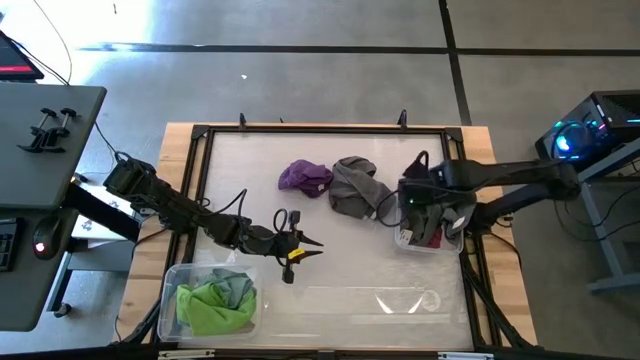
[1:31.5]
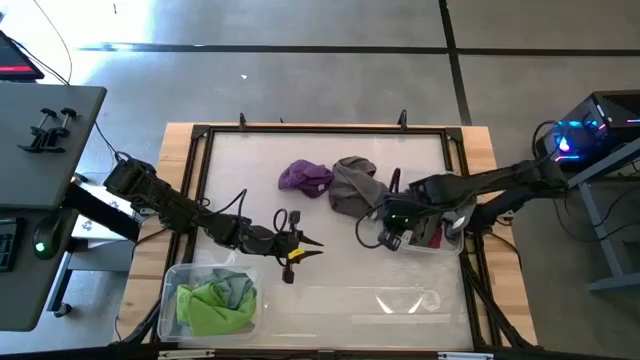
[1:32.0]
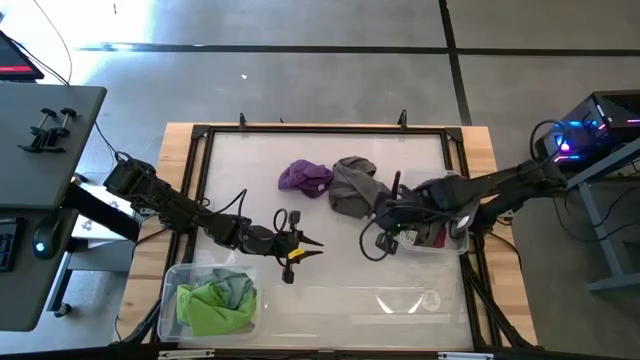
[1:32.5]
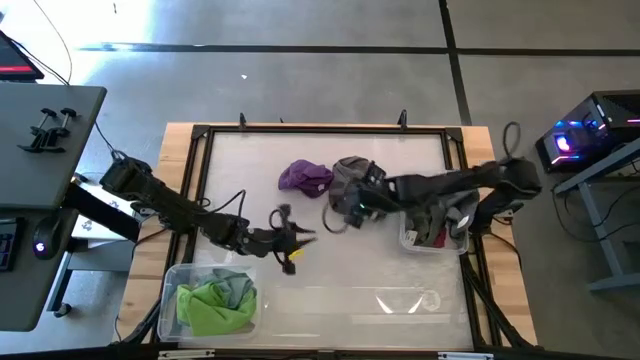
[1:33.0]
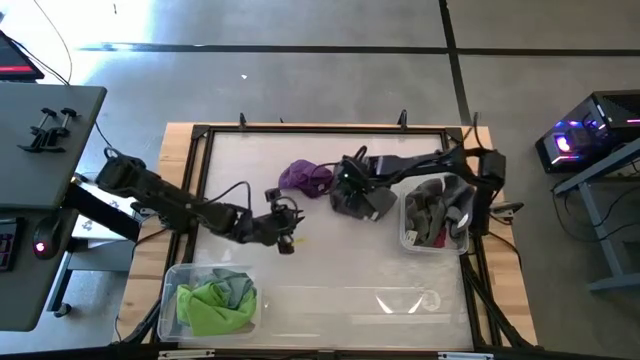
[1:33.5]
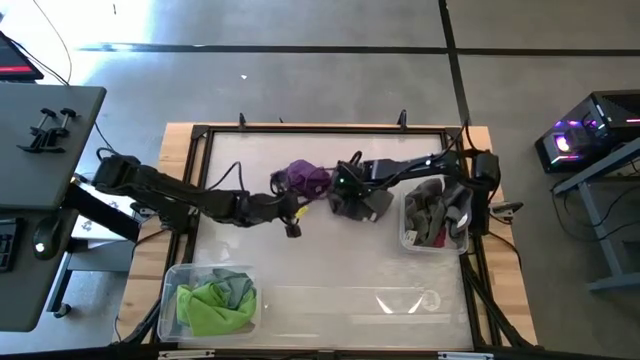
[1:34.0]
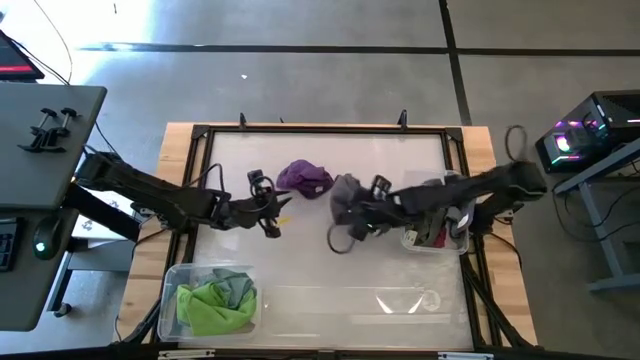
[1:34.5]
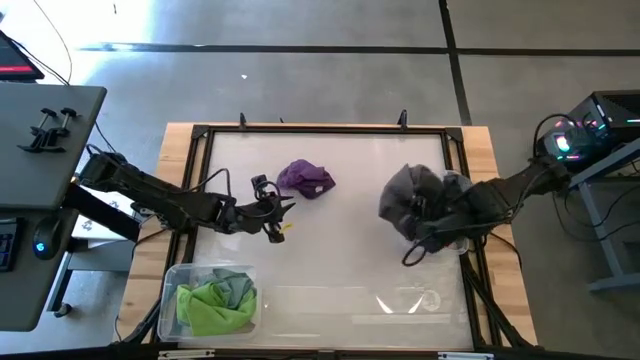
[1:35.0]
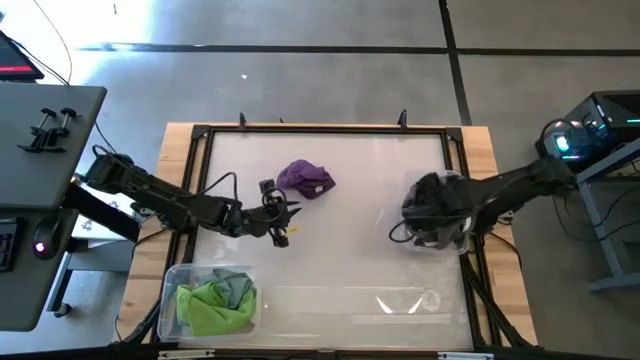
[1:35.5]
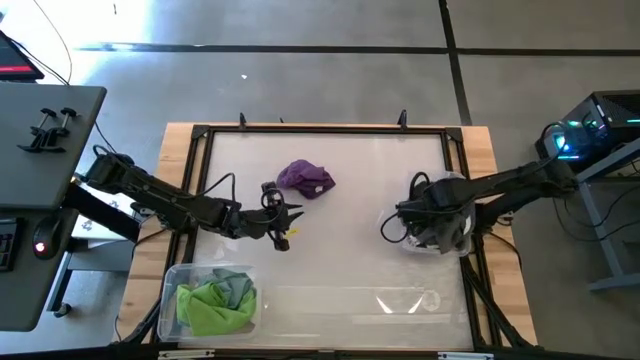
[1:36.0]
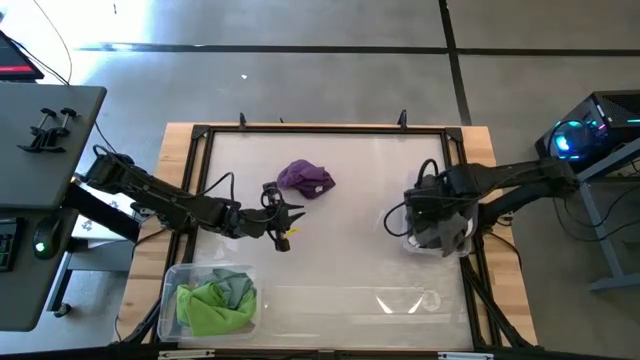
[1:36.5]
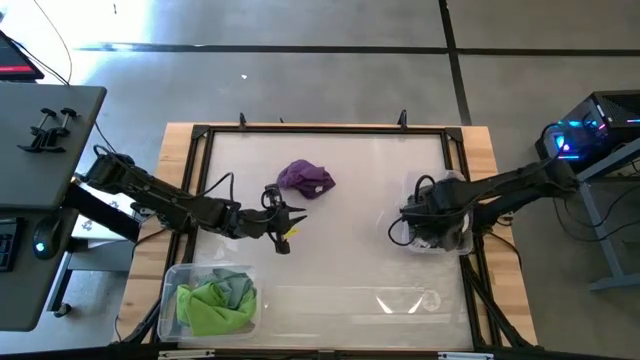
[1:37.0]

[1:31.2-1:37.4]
Task: Sort microfiber towel by color & place in baskets
Put the gray microfiber towel into the top transparent bin

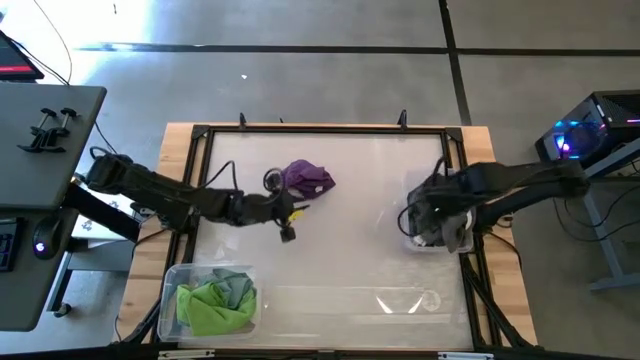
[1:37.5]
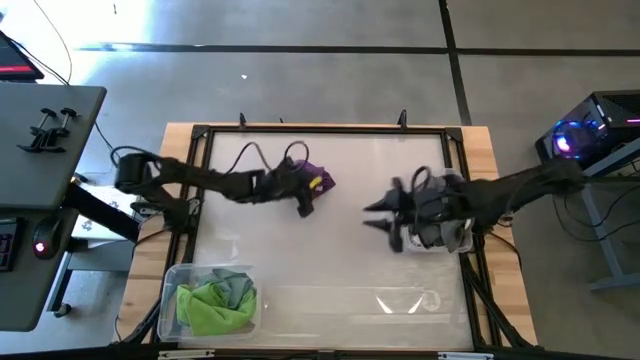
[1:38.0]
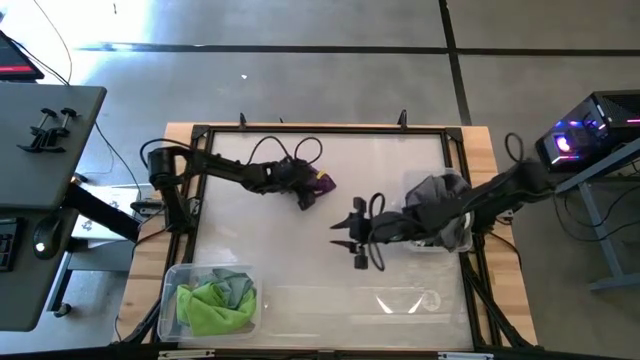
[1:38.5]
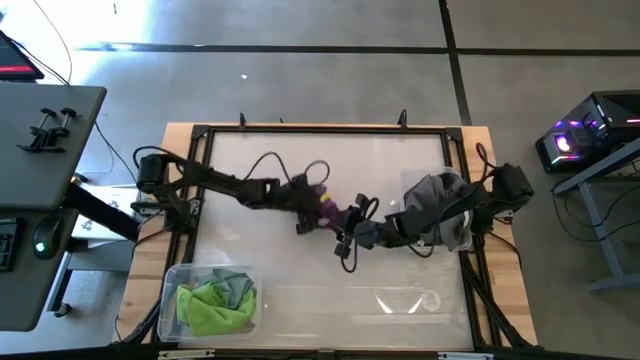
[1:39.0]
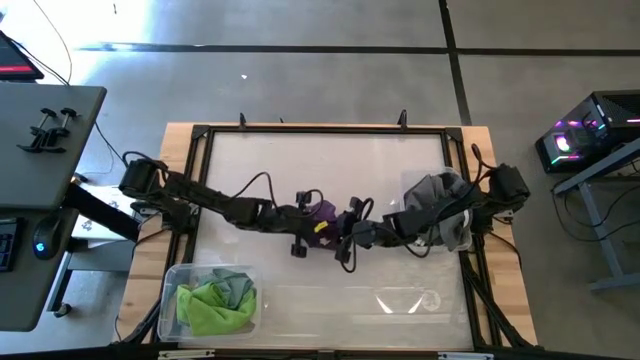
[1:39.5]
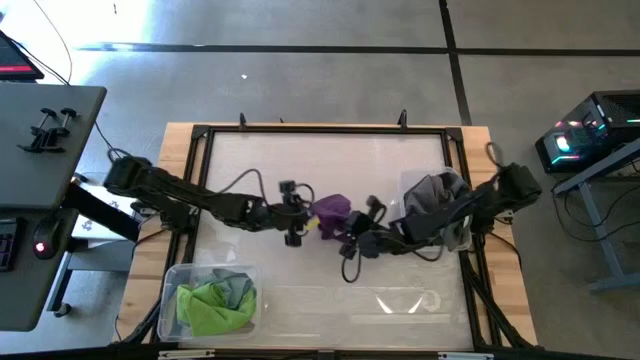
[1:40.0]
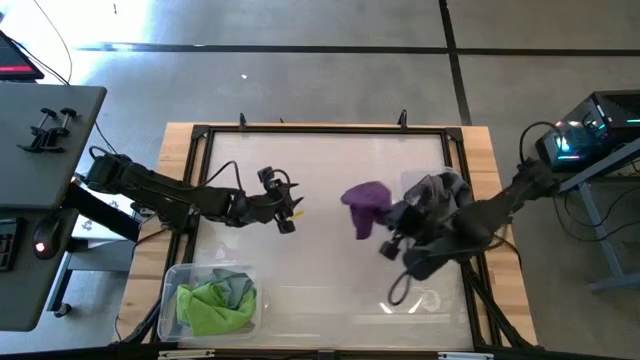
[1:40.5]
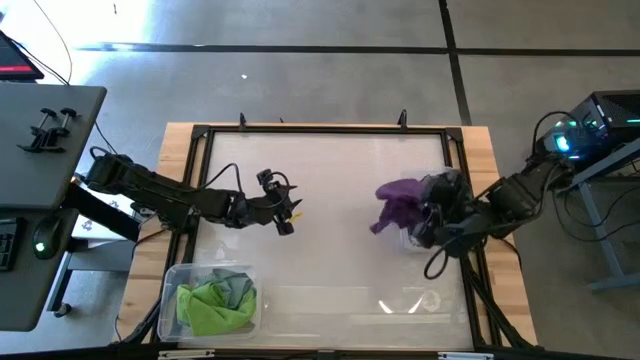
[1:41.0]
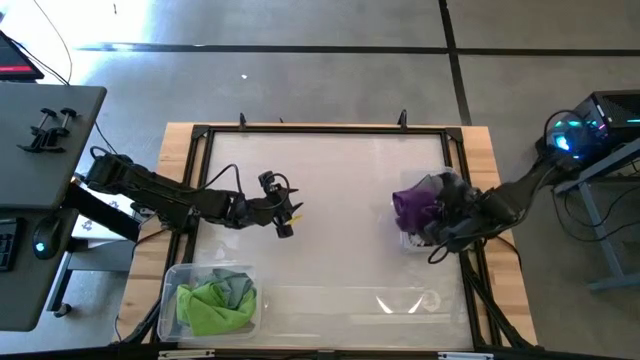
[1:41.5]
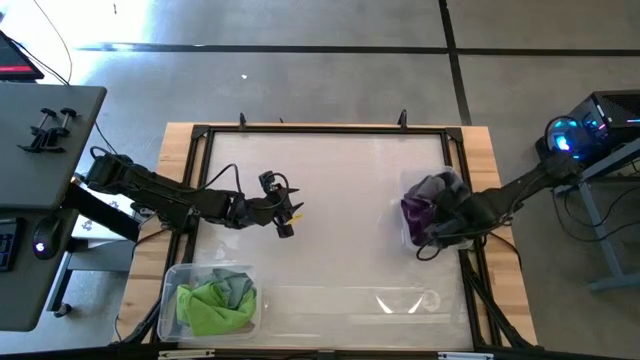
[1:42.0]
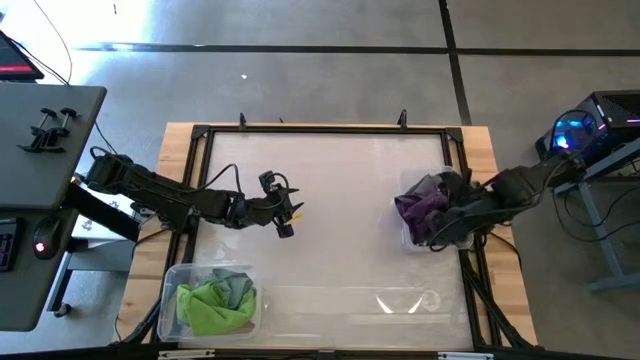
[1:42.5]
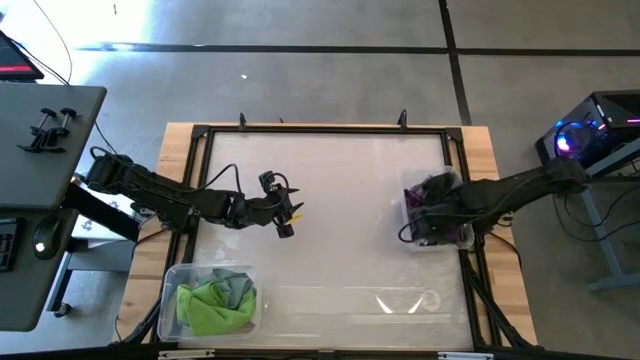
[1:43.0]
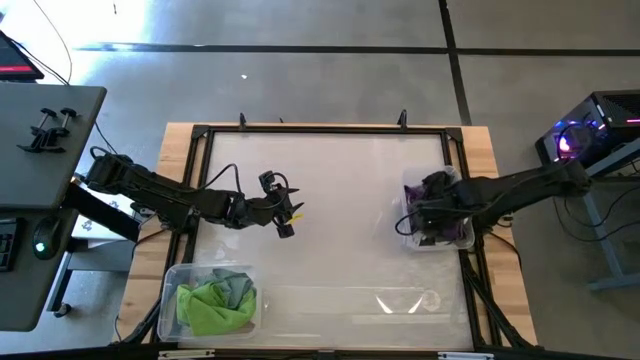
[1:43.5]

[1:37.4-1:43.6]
Put the violet microfiber towel into the top transparent bin

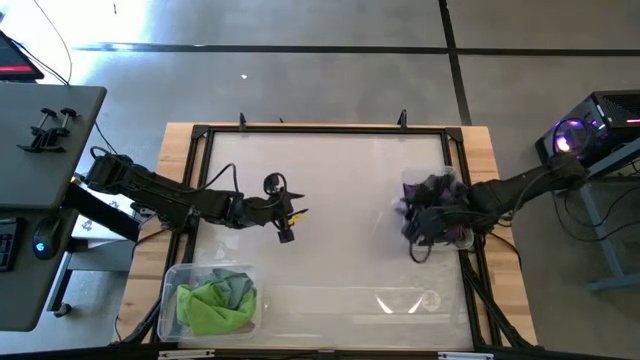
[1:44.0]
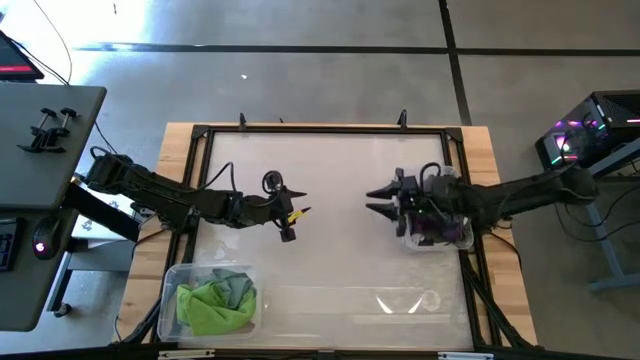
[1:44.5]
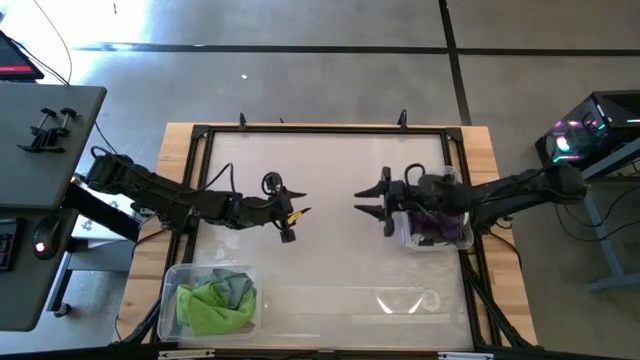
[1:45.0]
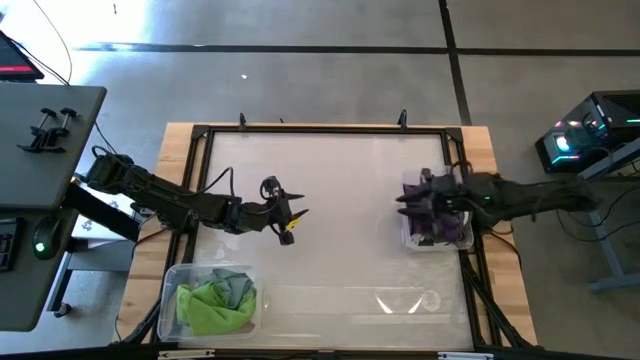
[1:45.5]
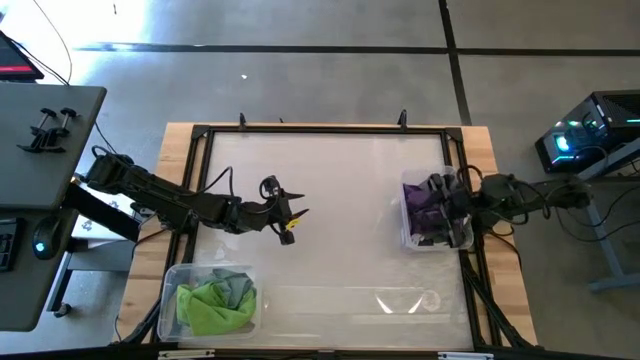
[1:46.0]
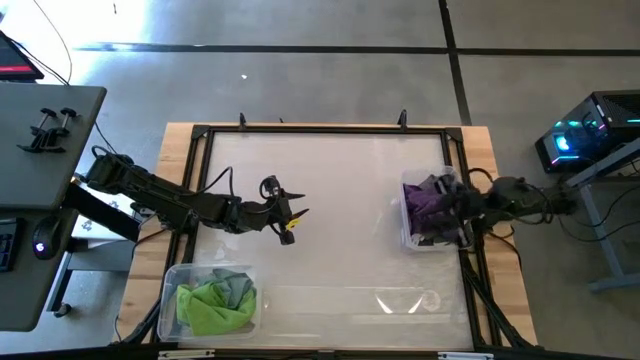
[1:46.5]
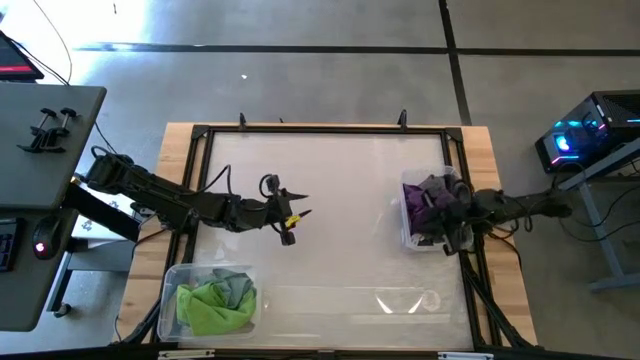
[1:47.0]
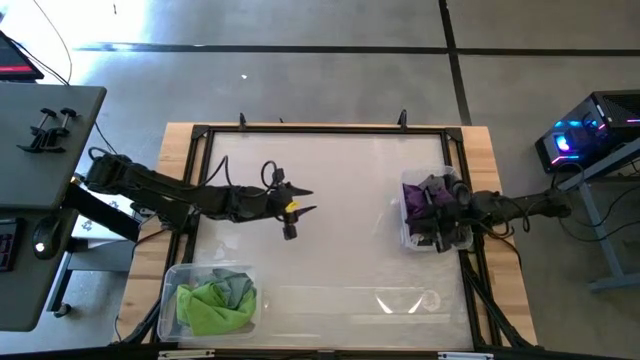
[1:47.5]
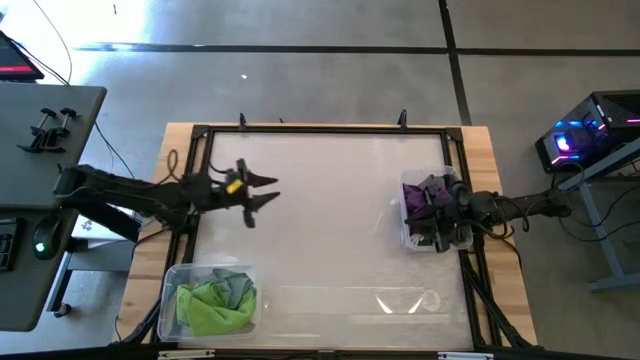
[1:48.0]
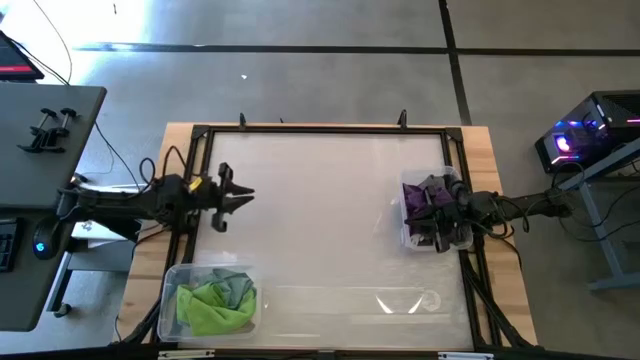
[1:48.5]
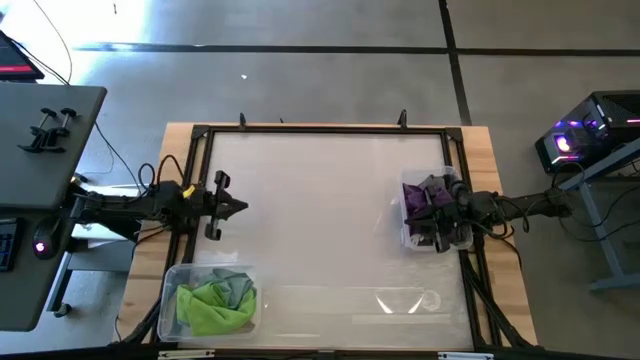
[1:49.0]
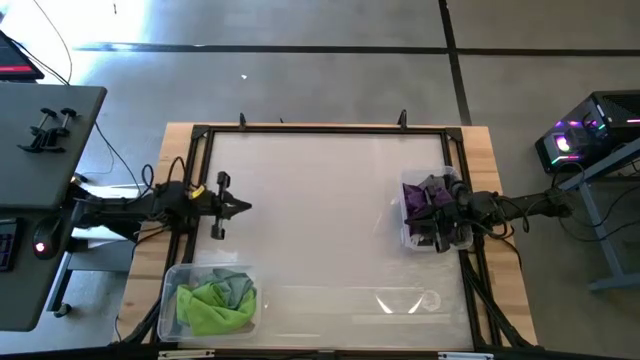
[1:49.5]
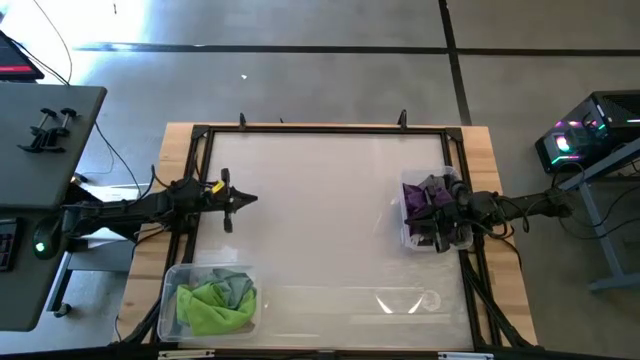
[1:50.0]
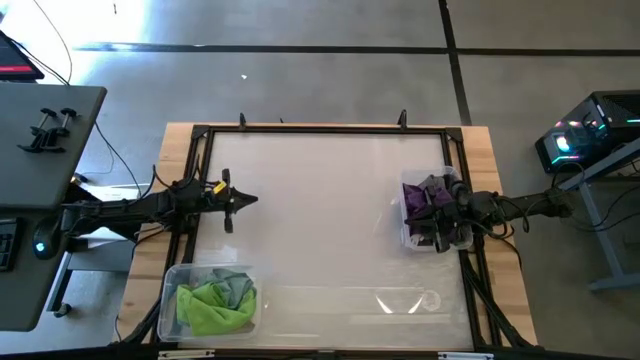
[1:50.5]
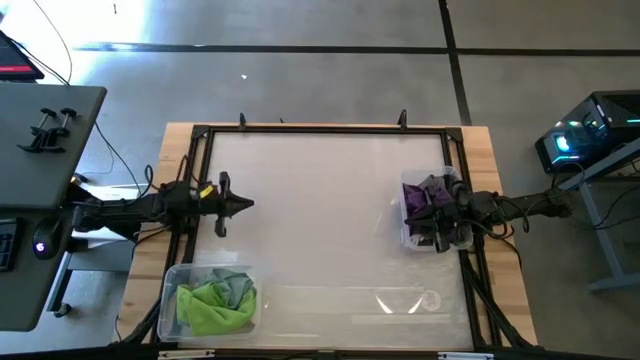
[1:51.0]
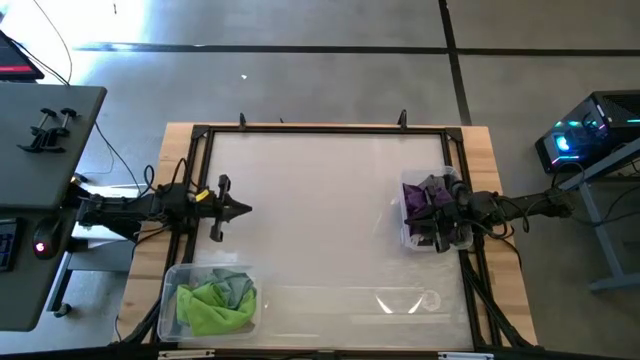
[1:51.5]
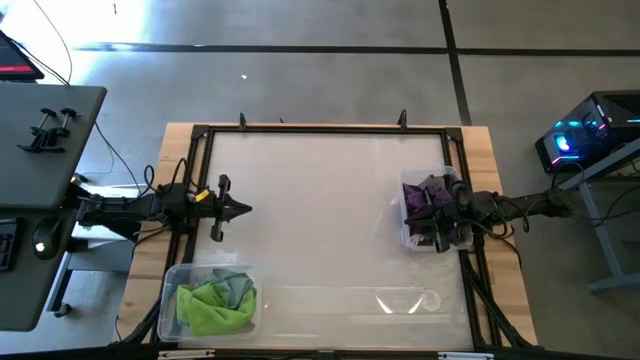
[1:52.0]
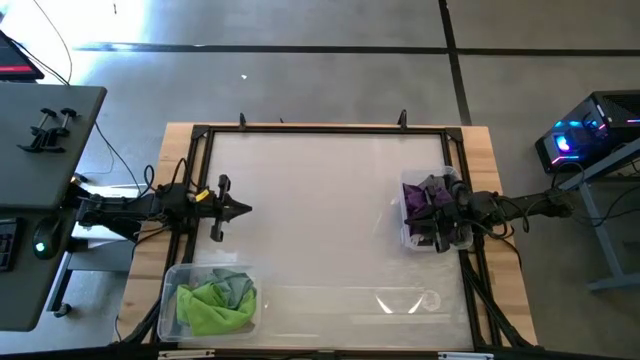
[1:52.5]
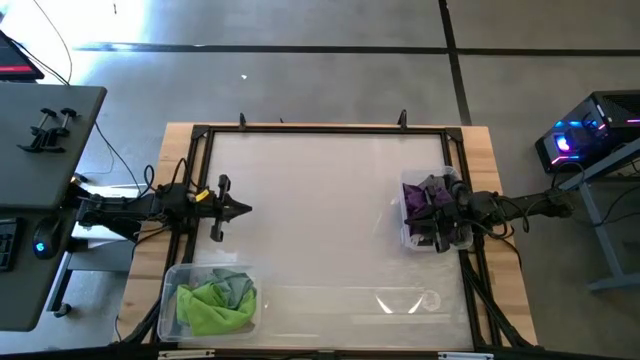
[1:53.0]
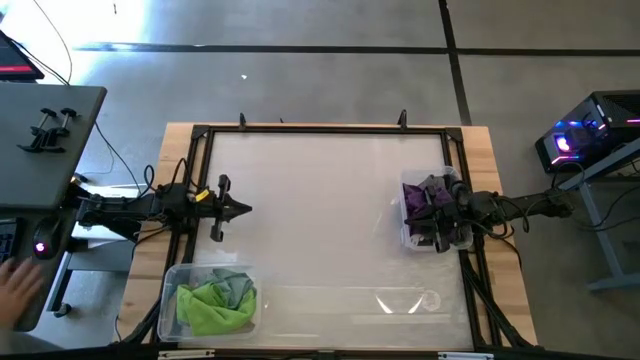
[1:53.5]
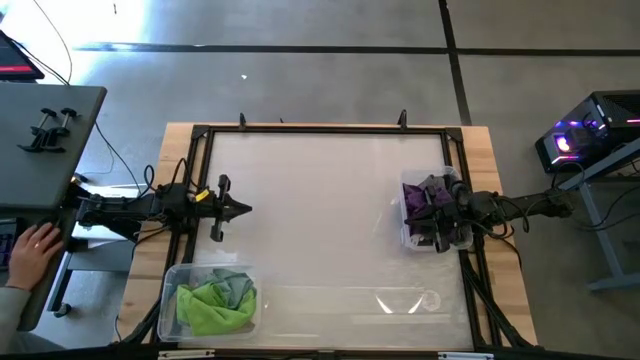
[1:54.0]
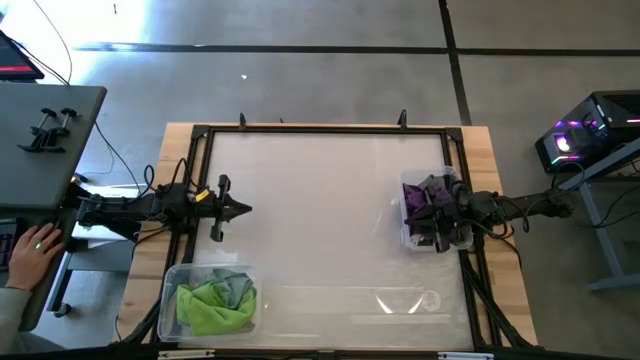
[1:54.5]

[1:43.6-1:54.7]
Return to Home Position
